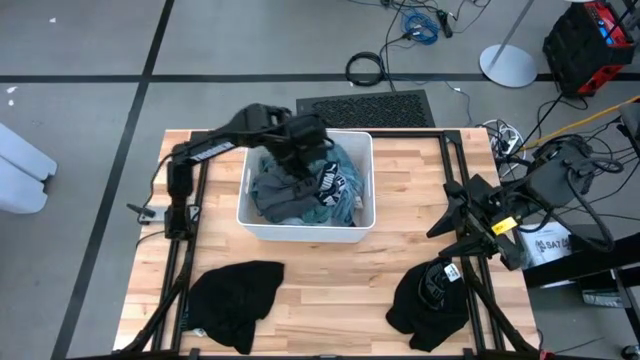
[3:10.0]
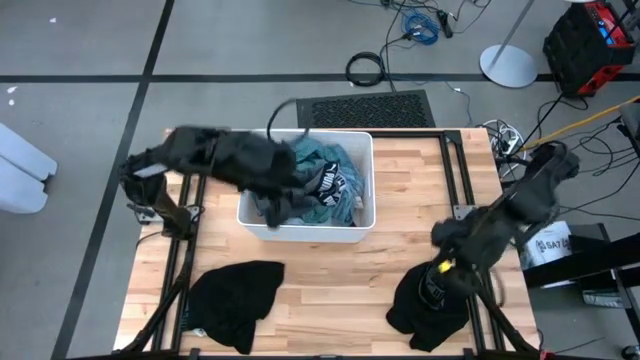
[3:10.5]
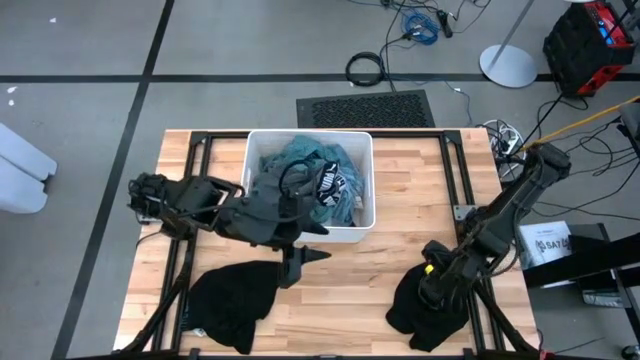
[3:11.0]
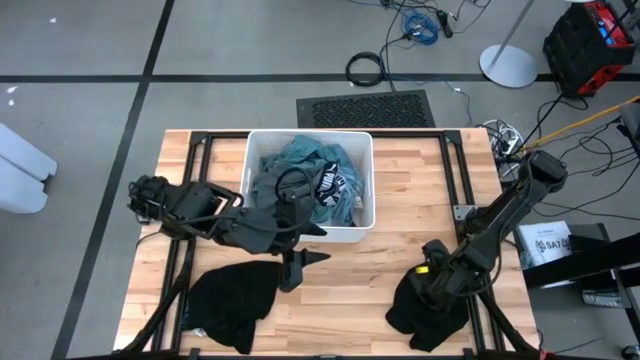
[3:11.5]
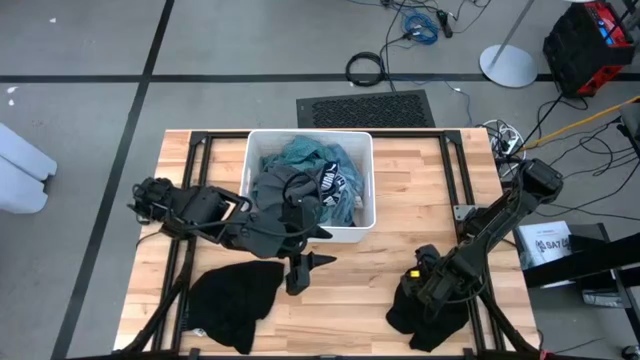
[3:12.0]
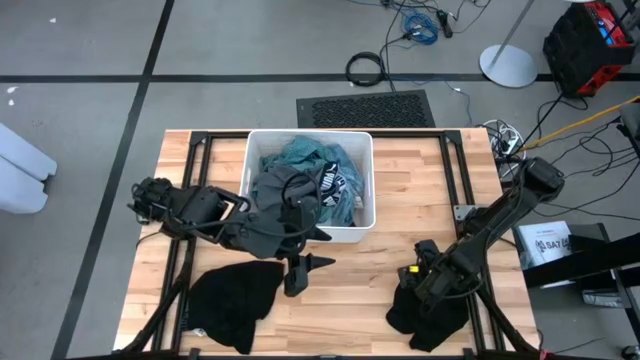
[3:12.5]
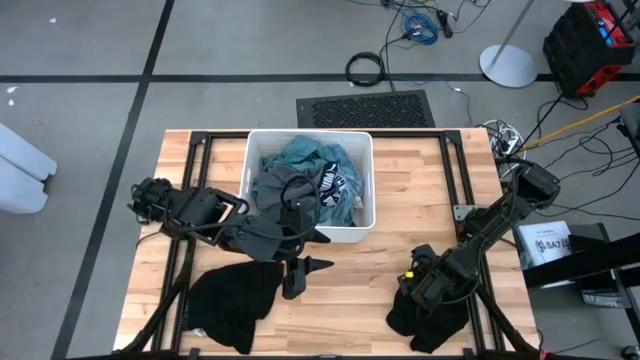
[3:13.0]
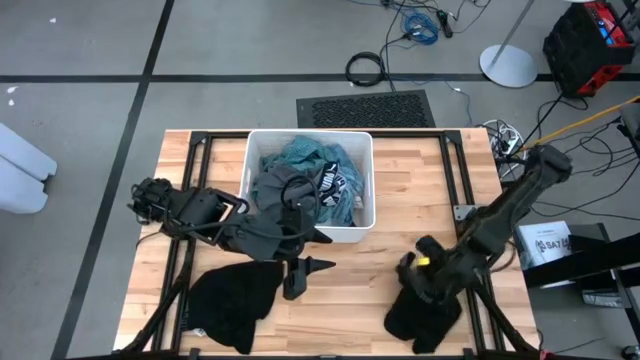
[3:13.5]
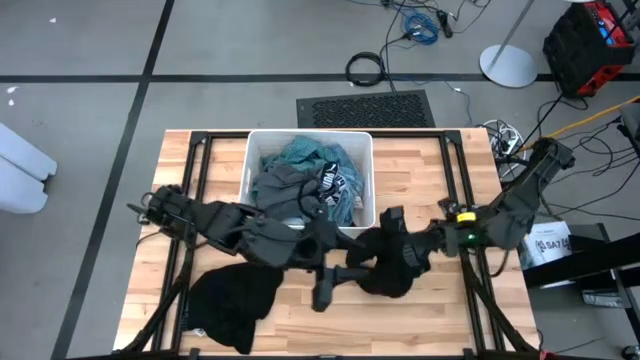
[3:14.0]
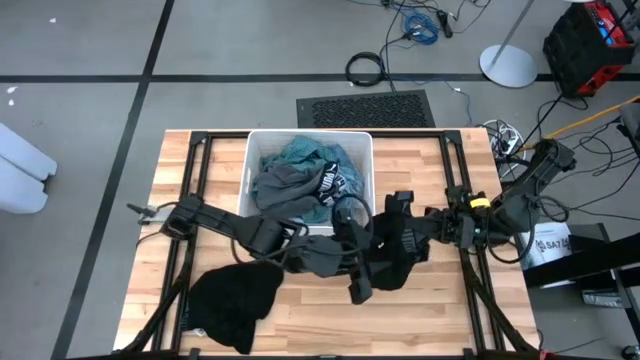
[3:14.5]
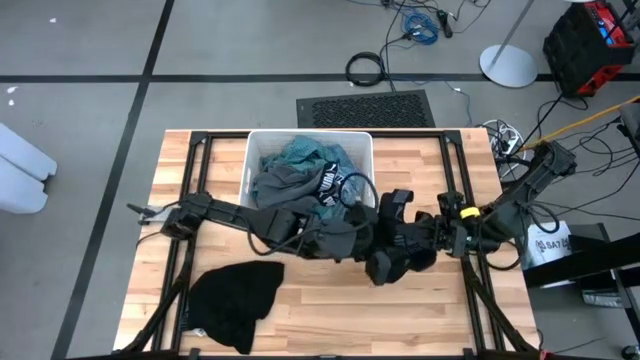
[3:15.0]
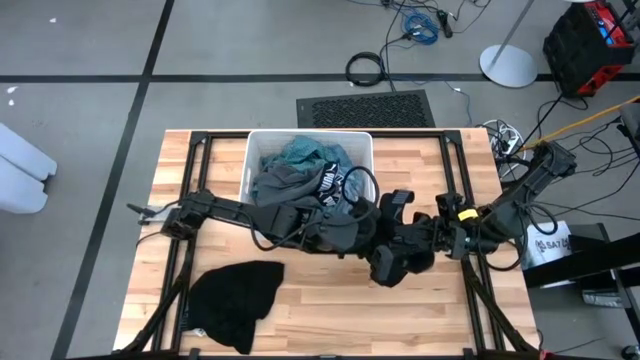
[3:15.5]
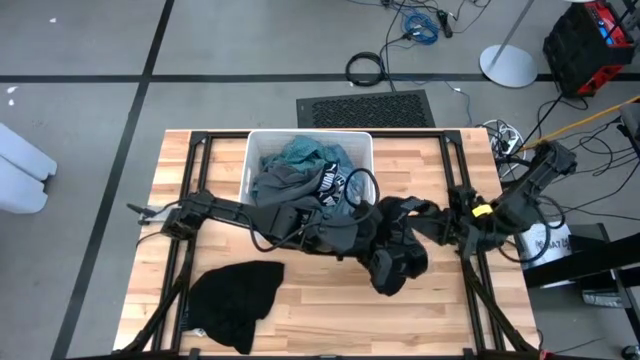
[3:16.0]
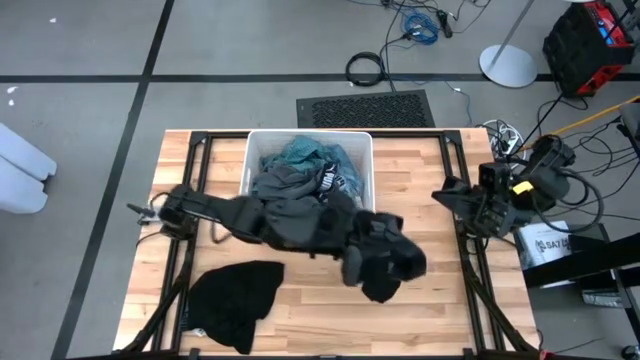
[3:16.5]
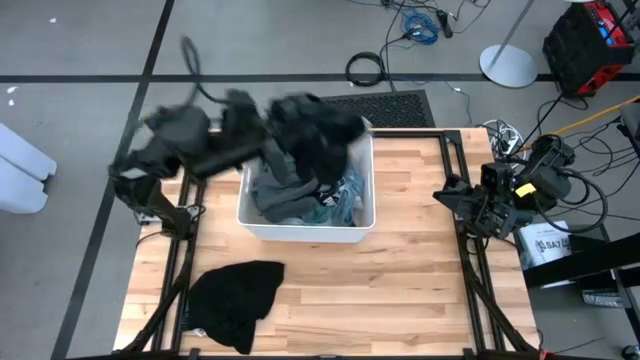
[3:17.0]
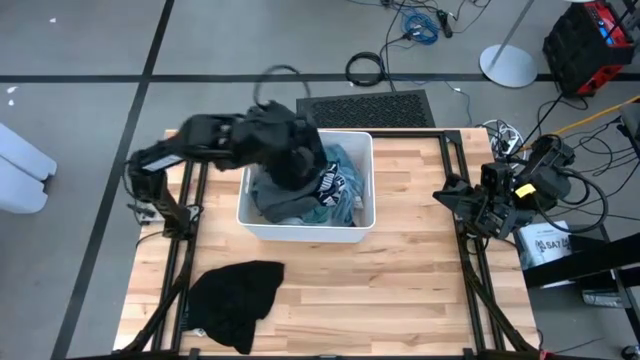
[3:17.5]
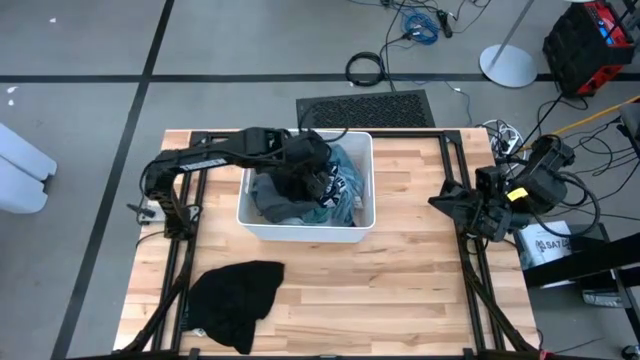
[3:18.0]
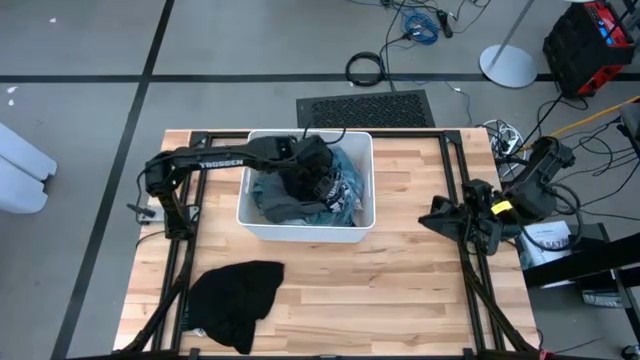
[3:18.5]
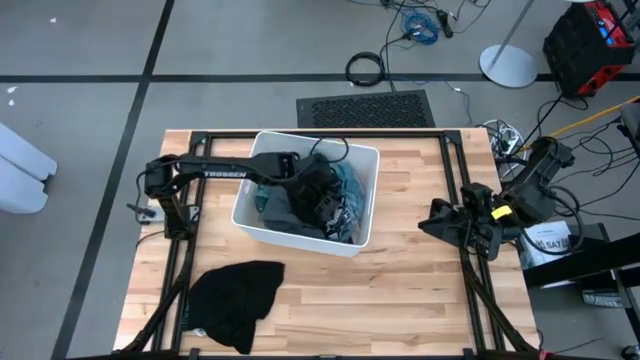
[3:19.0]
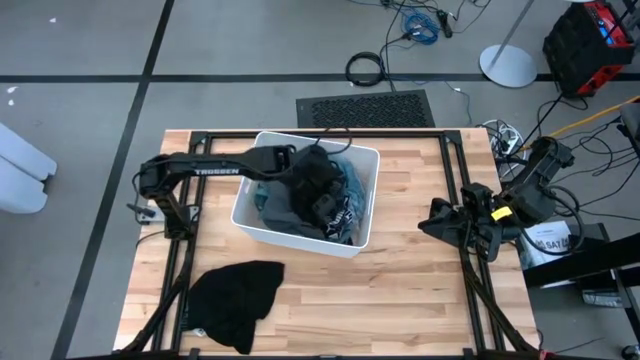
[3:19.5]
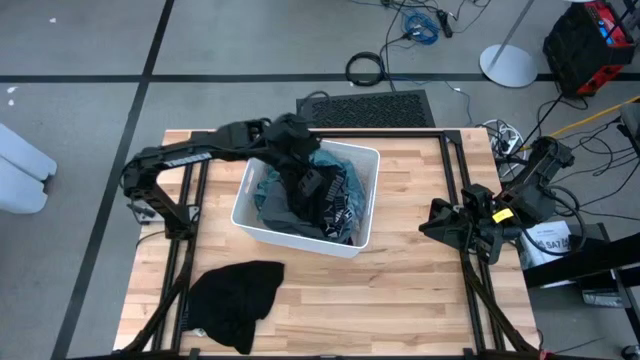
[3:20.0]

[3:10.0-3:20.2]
Task: Sort clothes
Put the black boxer into the white laundry bin

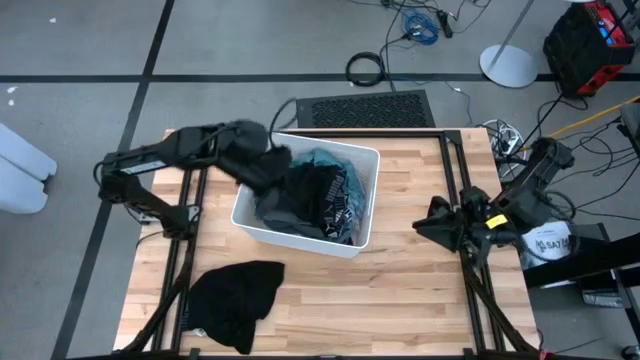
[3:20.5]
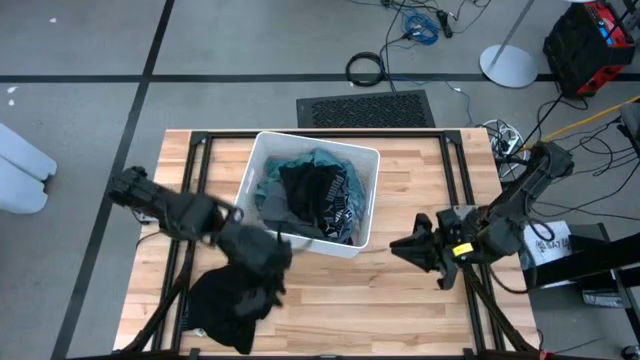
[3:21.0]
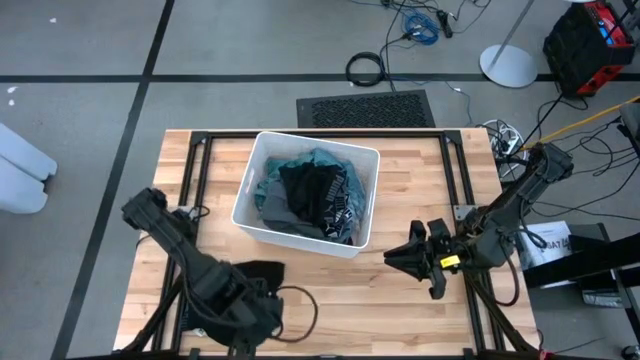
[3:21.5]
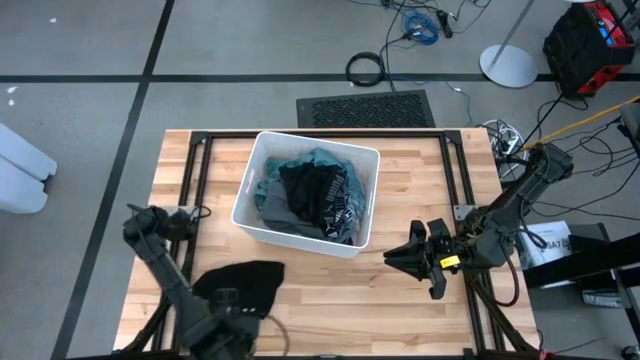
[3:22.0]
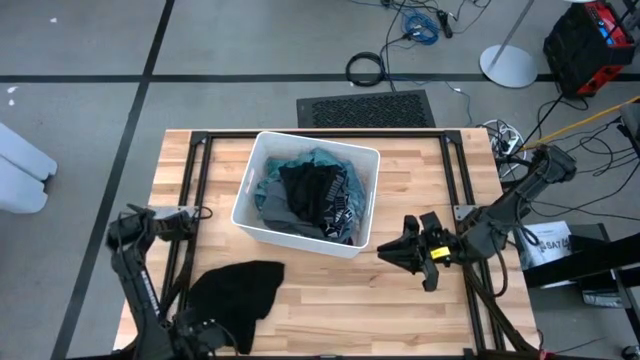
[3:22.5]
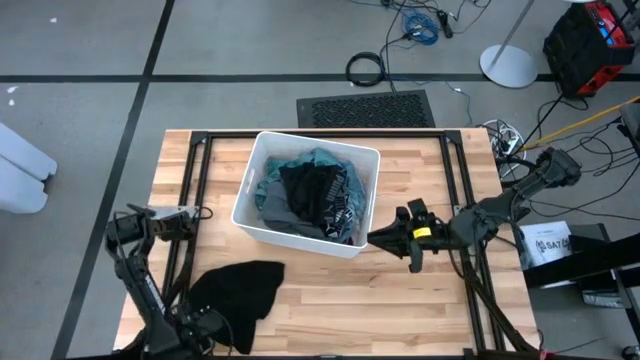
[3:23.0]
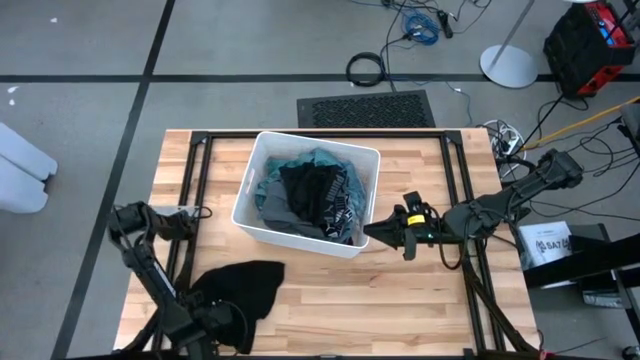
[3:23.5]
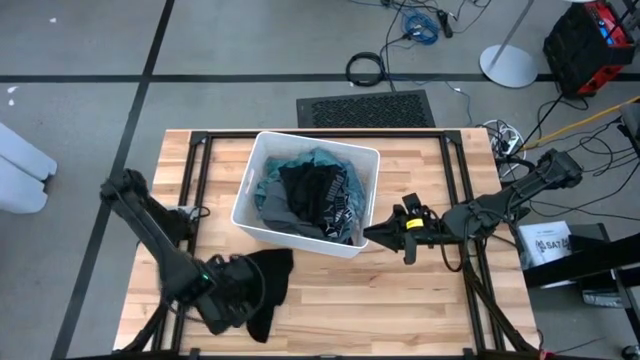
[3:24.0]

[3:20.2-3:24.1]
Put the black boxer into the white laundry bin

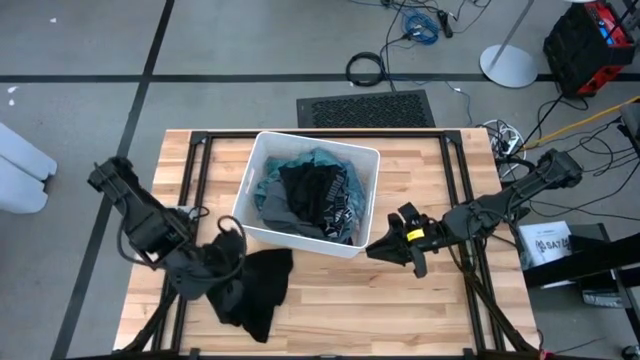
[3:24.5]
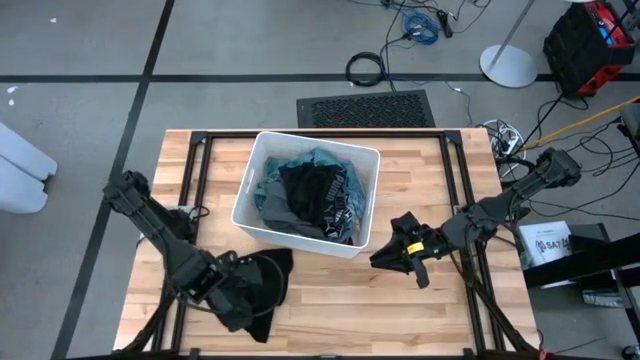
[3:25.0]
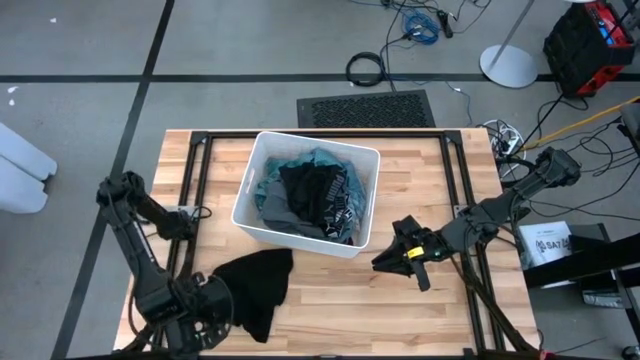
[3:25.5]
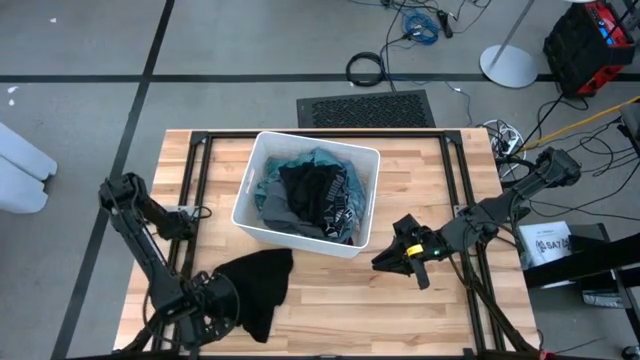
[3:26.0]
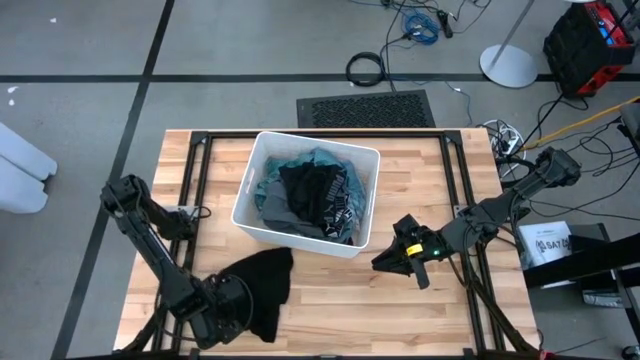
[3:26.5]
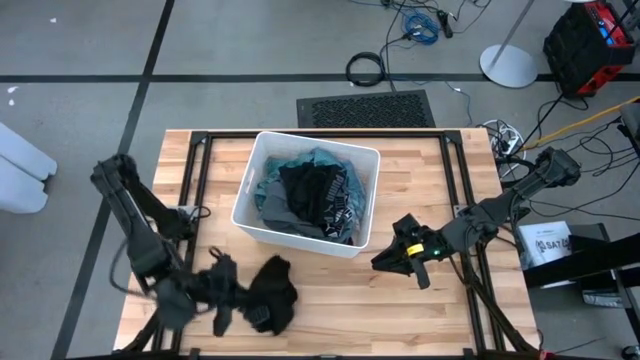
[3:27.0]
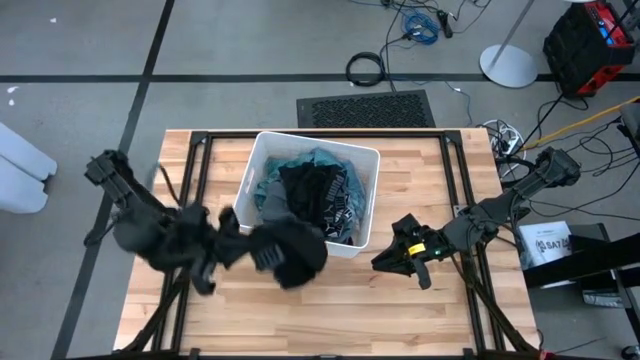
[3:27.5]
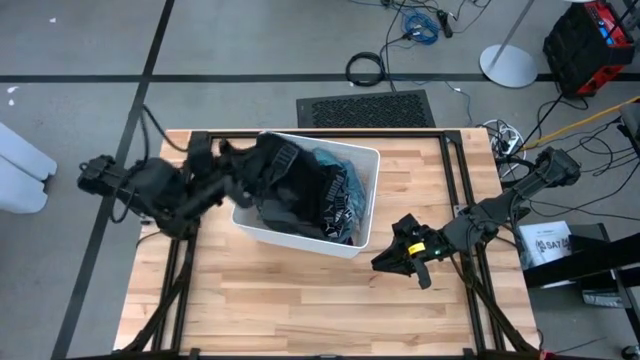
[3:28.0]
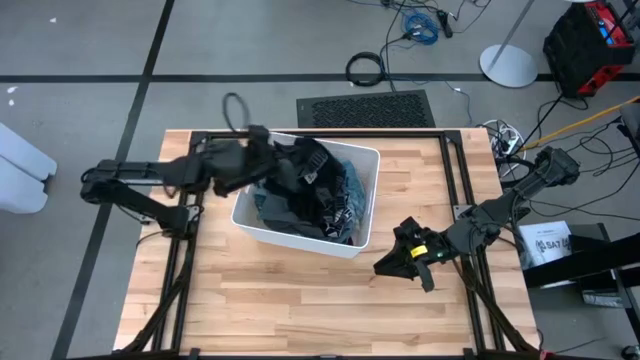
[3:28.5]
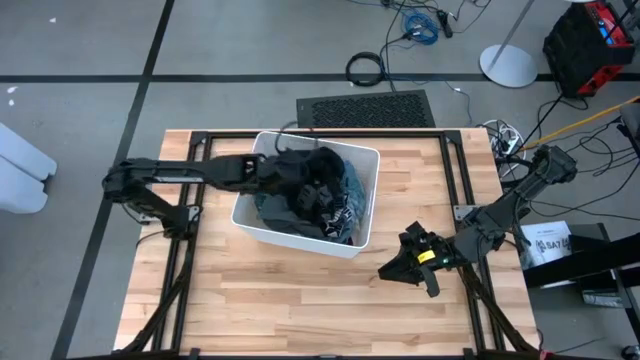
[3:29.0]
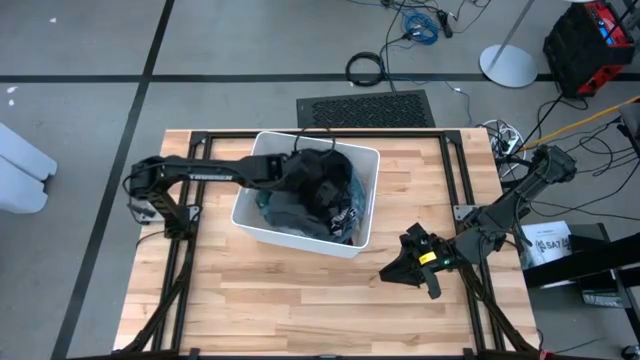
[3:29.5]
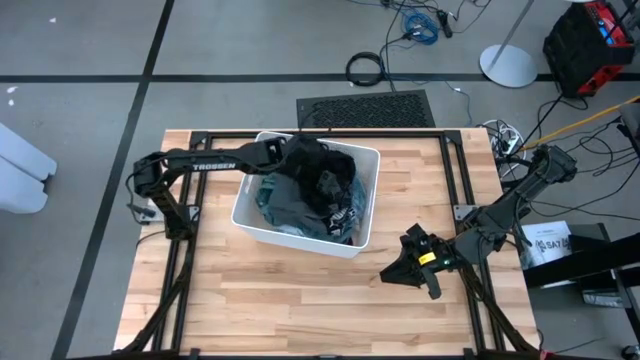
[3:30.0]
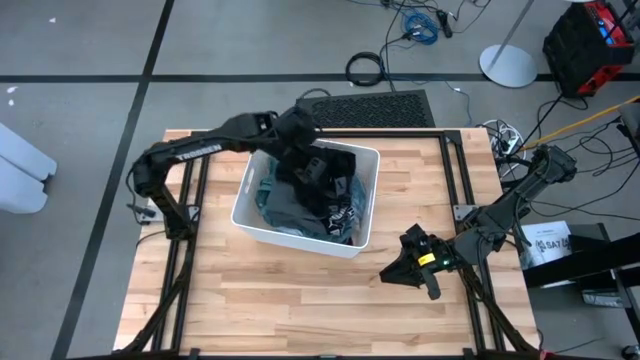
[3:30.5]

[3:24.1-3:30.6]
Put the black boxer into the white laundry bin
